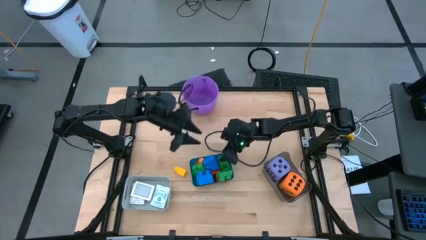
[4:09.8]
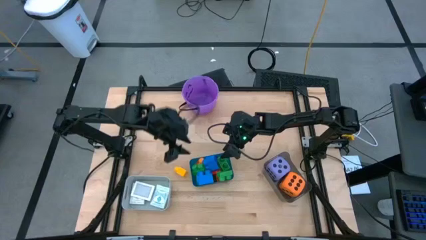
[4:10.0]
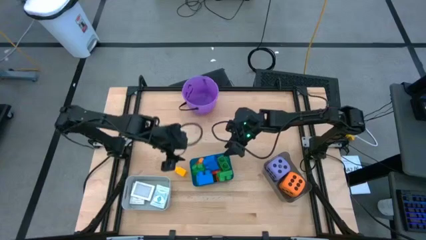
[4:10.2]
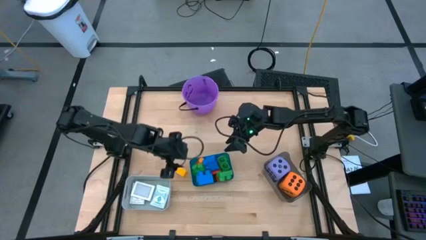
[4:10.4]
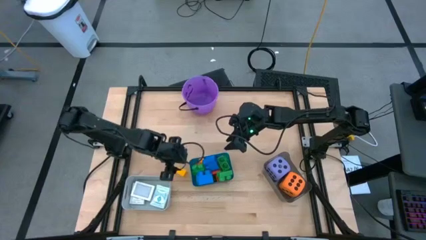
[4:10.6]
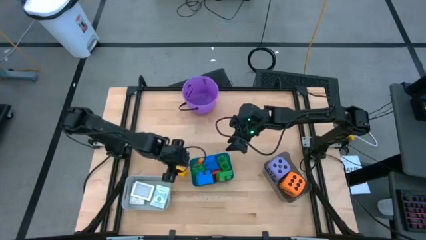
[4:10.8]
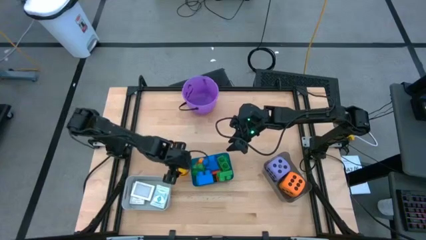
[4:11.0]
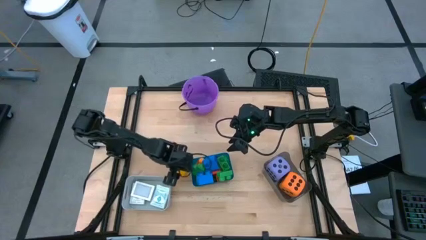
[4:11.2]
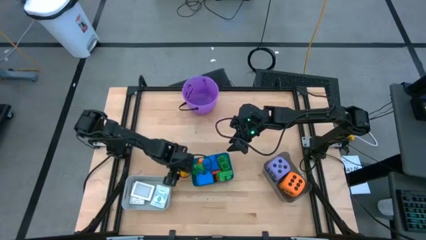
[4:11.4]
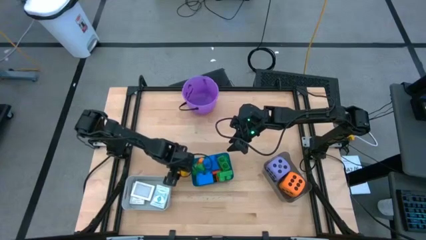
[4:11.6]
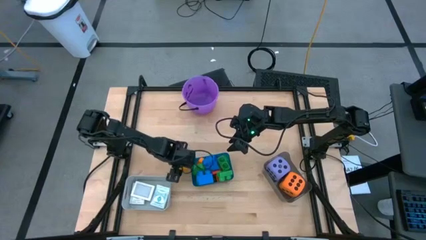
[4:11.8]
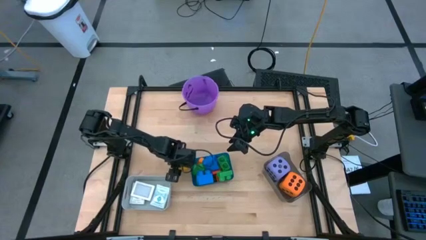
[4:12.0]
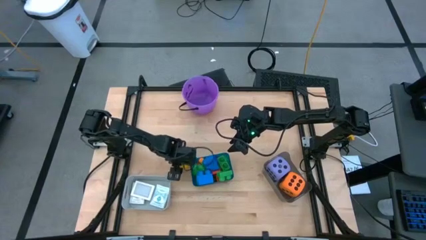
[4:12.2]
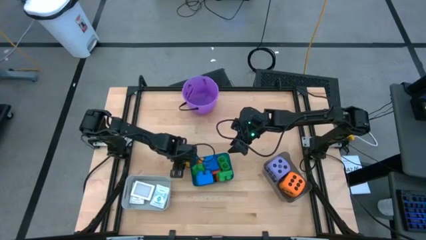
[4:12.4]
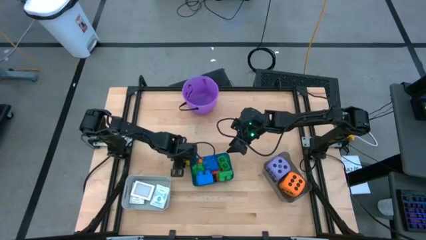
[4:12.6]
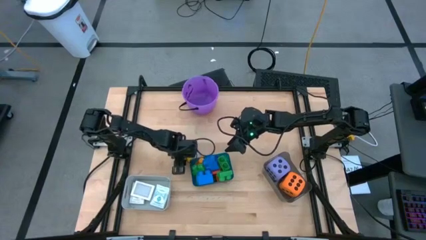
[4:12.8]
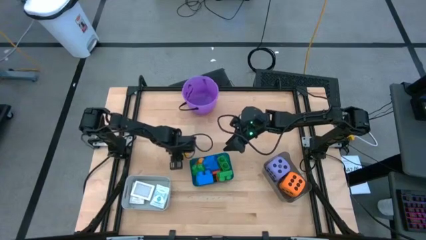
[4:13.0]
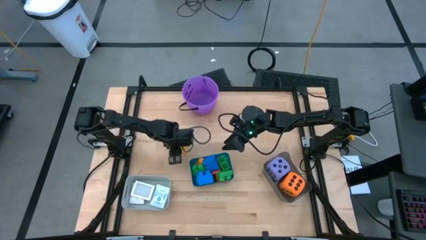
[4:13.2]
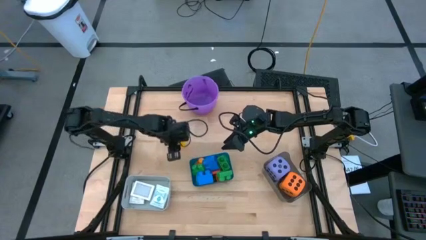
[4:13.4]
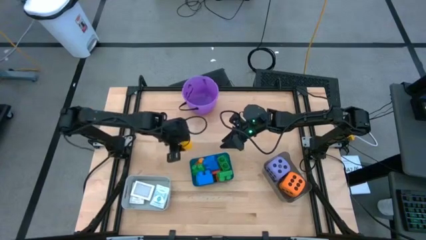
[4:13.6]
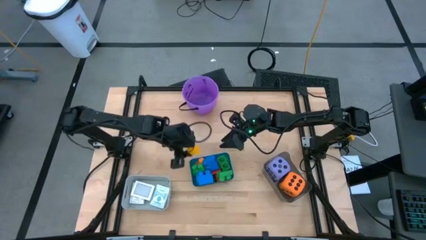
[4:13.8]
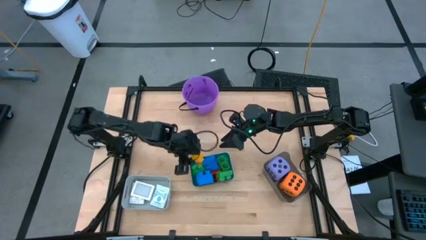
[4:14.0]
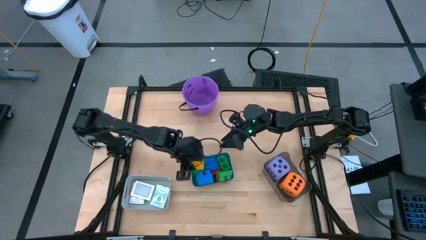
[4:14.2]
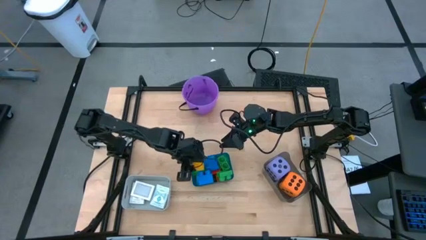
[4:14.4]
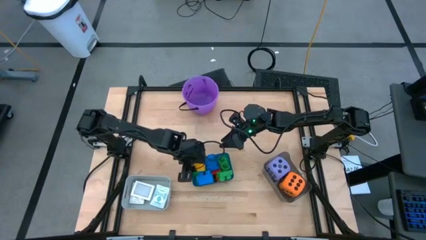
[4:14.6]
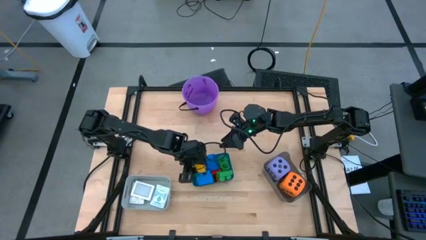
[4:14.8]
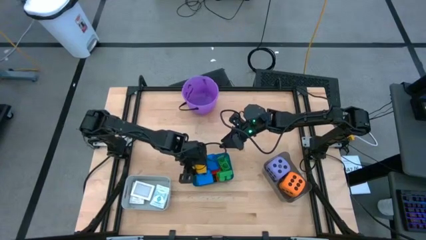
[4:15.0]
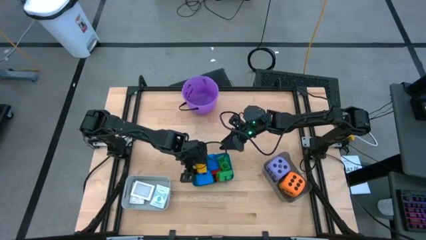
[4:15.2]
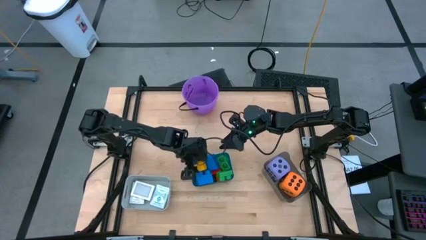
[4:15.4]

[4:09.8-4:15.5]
Task: Pick & Place Toys
Put the yellow game piece into the blue bin

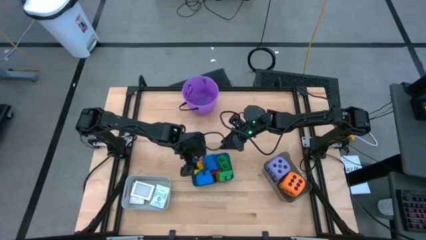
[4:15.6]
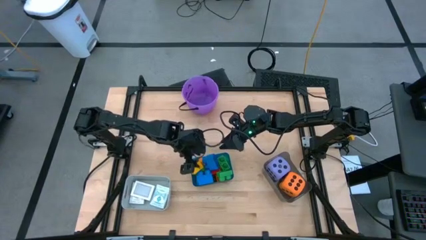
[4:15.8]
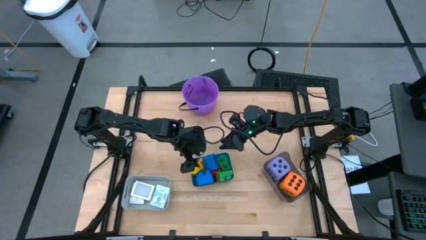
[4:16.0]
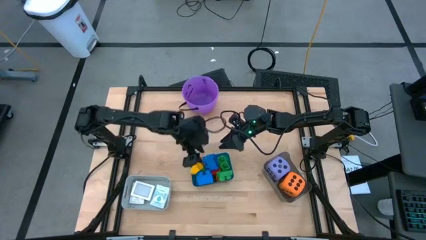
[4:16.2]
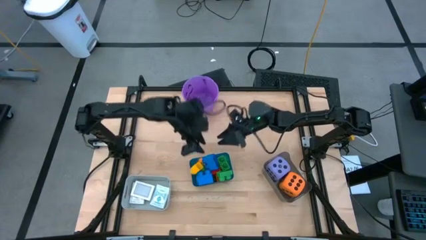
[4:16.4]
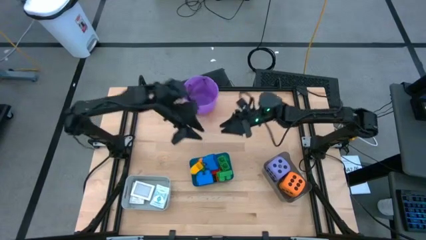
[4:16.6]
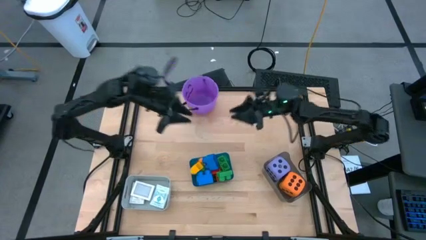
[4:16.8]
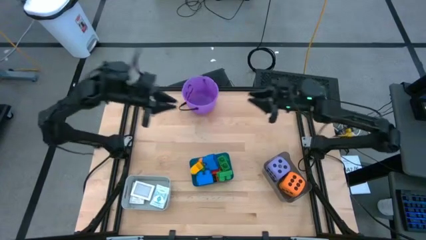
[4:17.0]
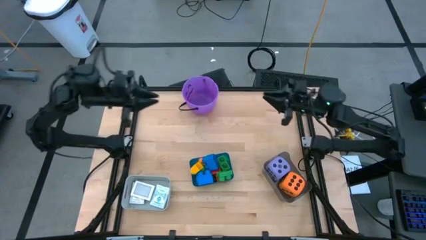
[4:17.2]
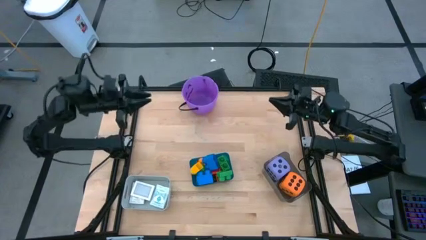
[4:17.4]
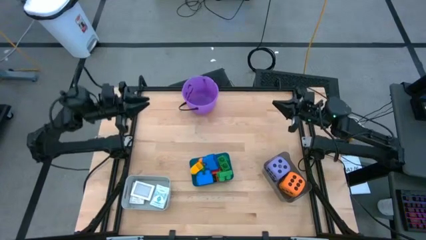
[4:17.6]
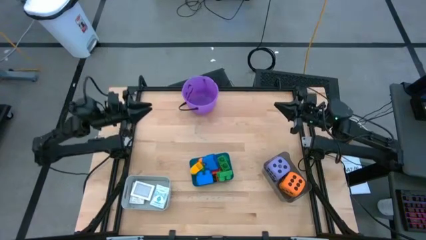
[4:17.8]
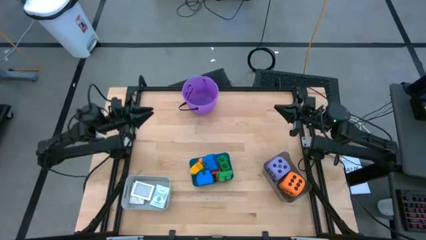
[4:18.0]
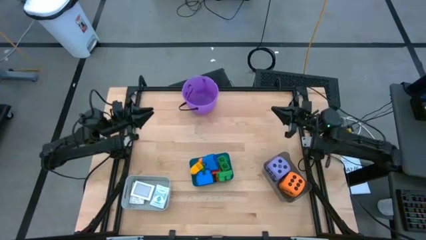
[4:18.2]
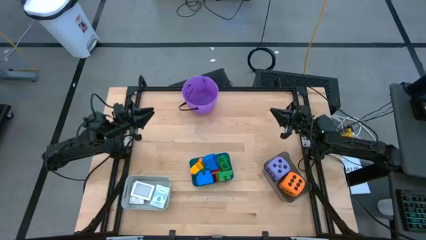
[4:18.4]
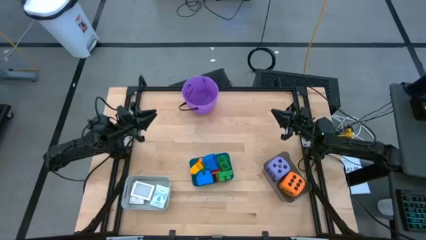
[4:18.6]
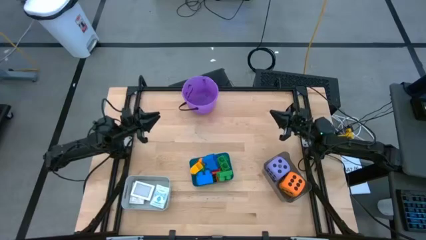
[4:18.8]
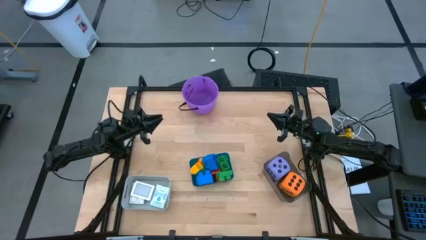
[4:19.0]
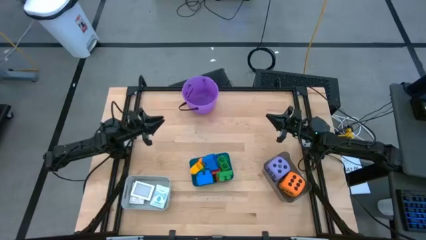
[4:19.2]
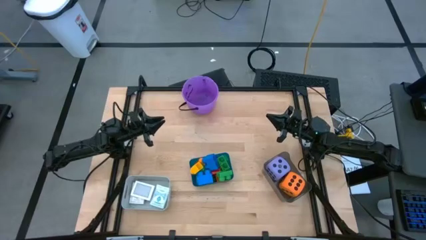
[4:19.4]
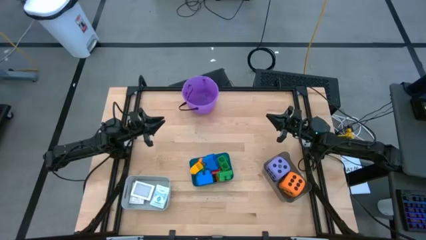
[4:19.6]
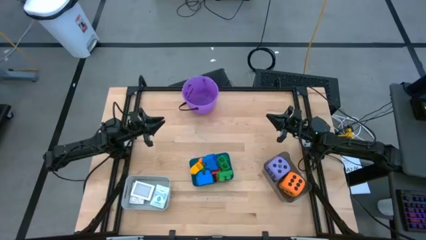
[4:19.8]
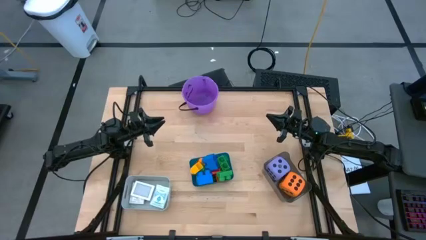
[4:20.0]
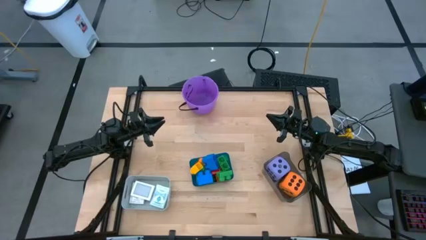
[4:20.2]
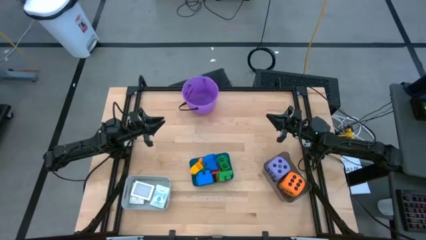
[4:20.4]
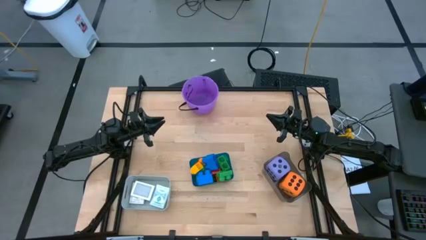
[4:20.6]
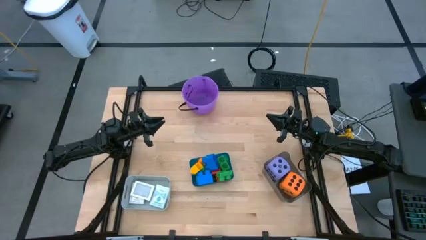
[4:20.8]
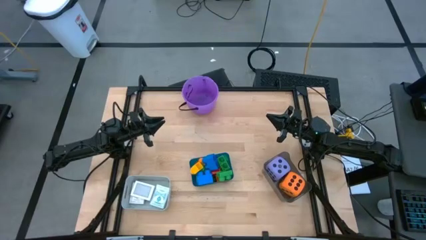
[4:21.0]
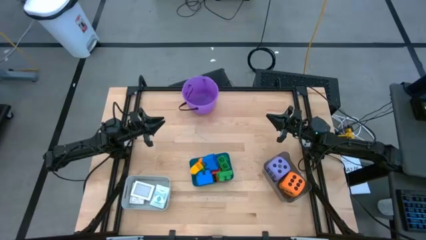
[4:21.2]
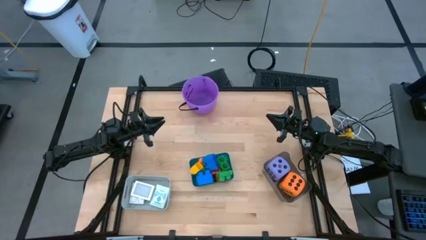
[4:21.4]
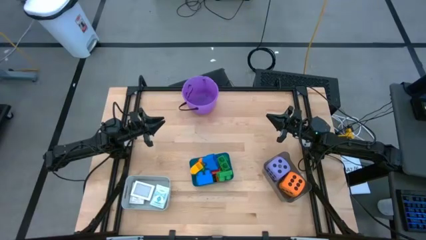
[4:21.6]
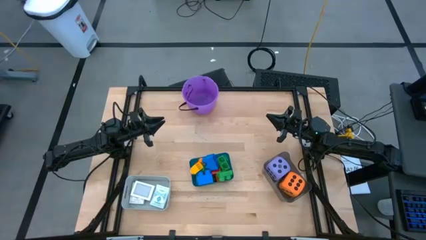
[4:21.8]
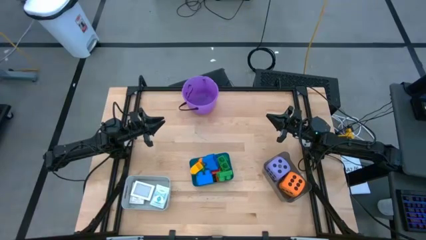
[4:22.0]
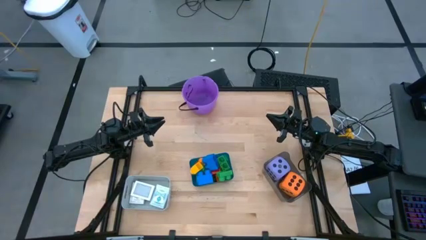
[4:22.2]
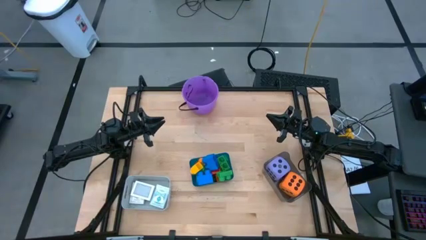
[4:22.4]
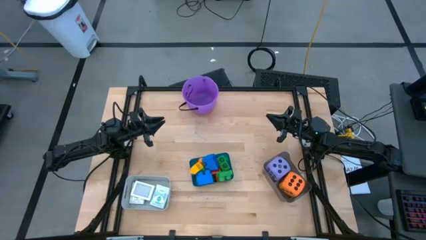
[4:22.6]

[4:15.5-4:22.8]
Return to Home Position

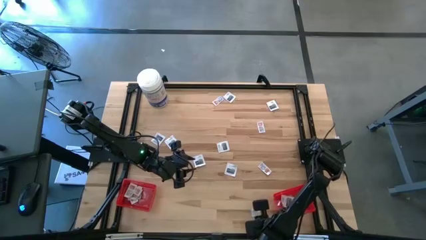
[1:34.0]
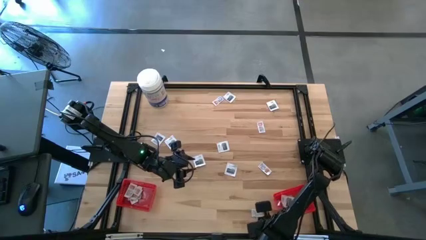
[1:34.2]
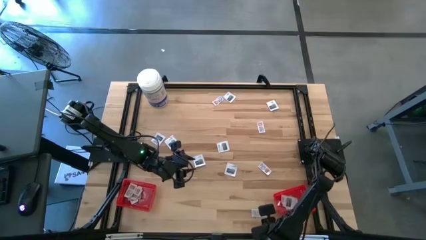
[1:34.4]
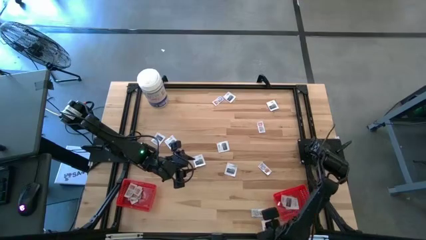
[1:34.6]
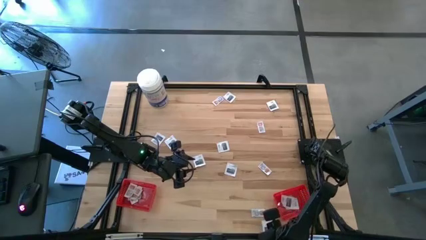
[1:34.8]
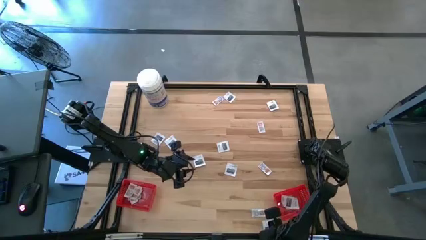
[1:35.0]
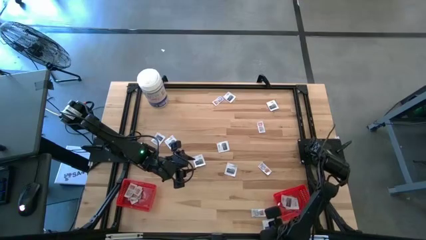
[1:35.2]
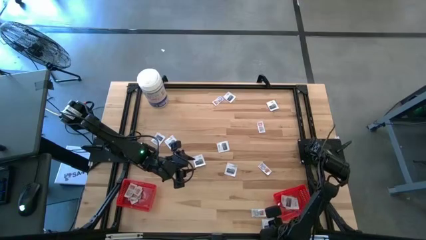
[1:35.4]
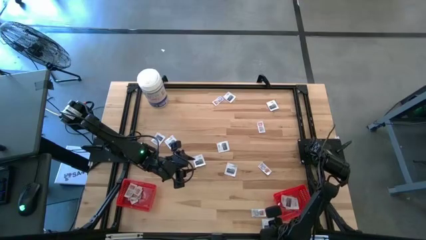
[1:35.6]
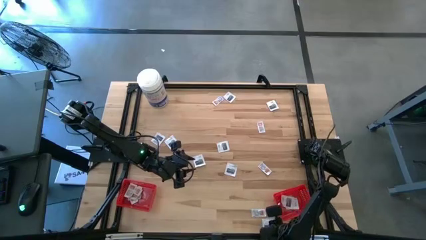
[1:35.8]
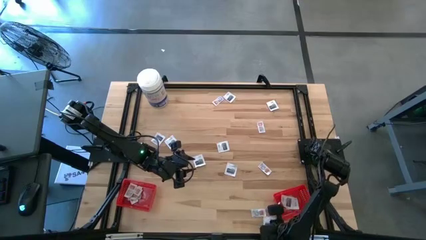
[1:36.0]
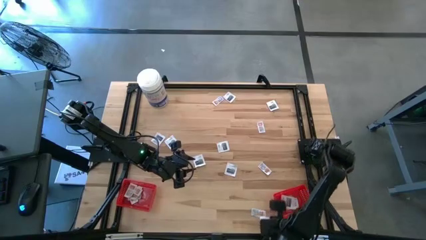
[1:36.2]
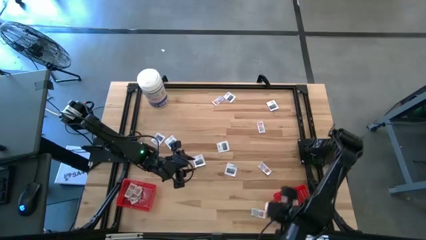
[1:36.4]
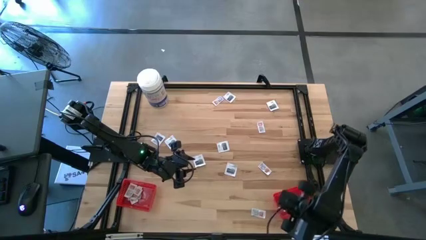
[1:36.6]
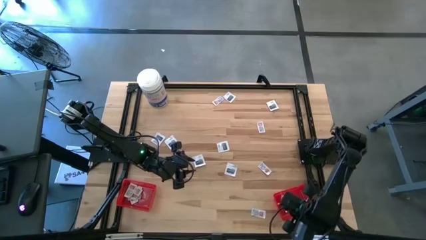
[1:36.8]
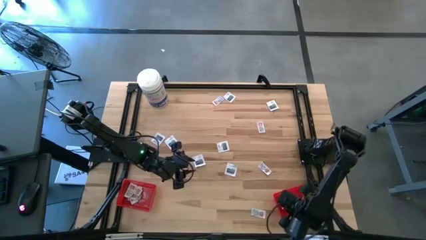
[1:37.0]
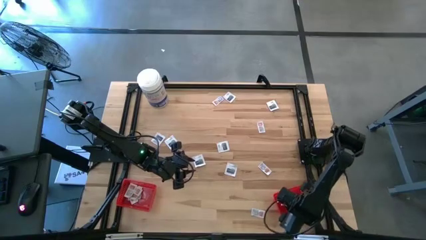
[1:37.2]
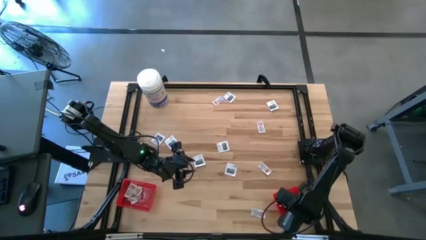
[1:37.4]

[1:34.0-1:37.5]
Task: Pick & Place First Aid Supplies
Put the towelette pack into the right red bin
